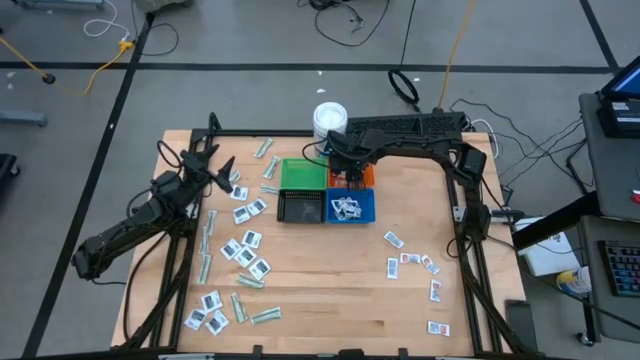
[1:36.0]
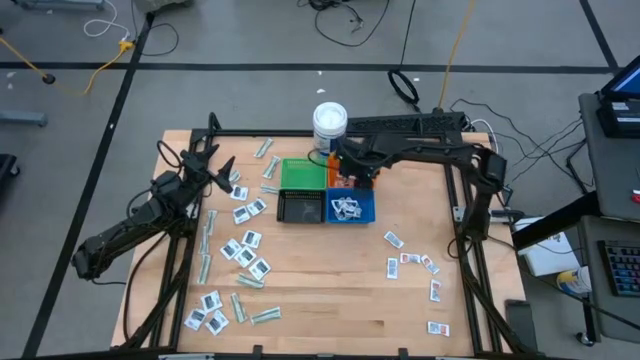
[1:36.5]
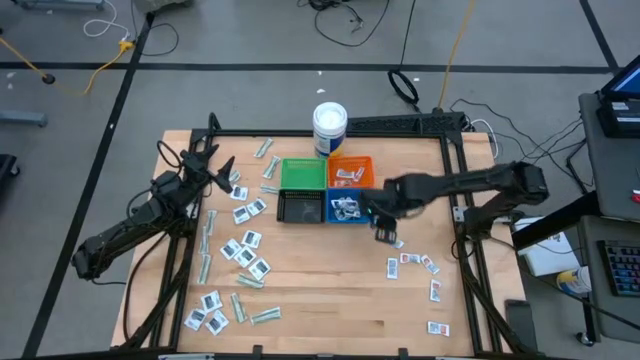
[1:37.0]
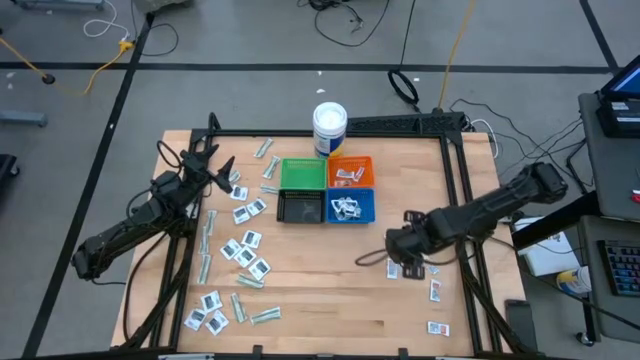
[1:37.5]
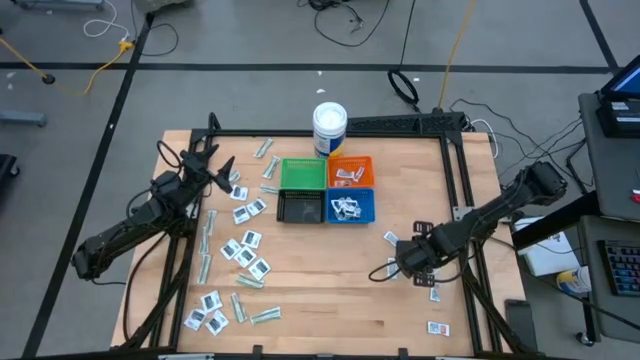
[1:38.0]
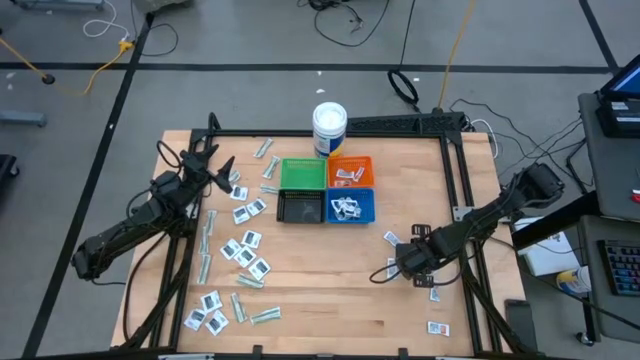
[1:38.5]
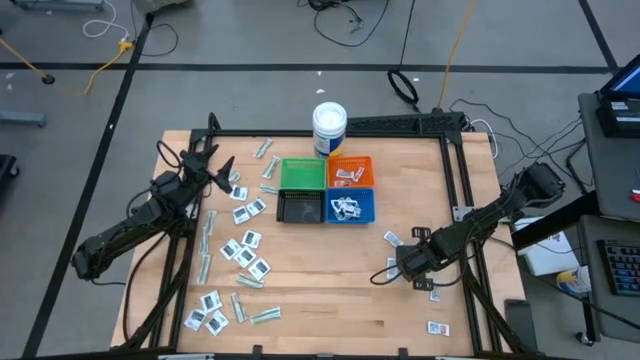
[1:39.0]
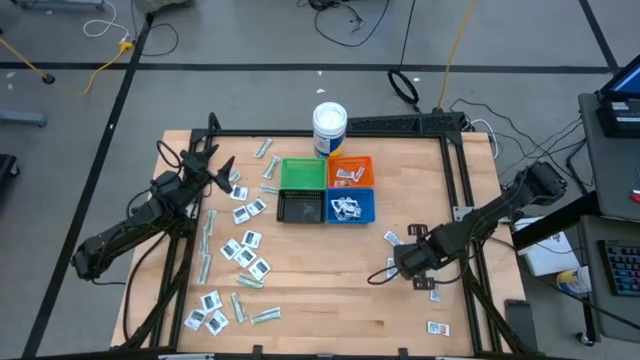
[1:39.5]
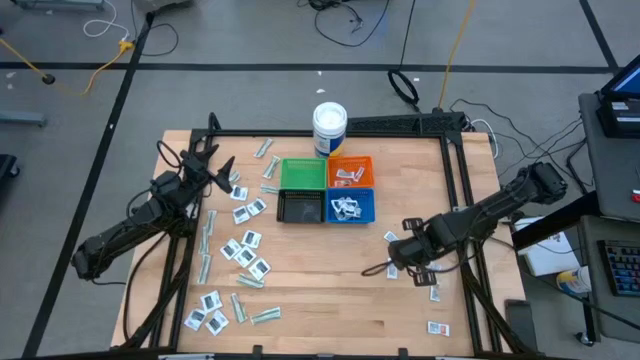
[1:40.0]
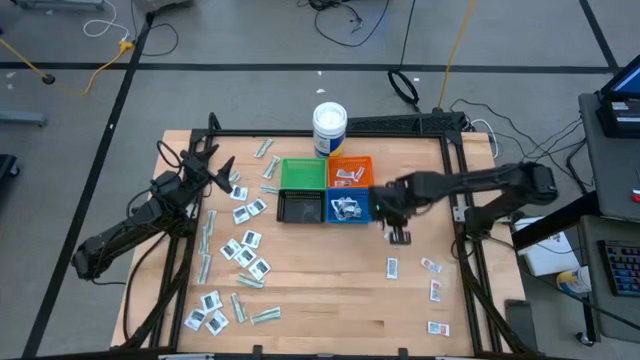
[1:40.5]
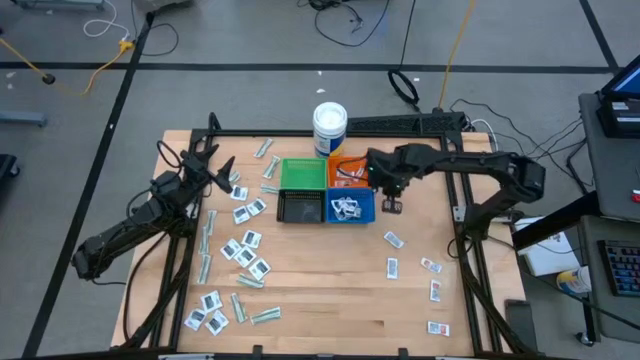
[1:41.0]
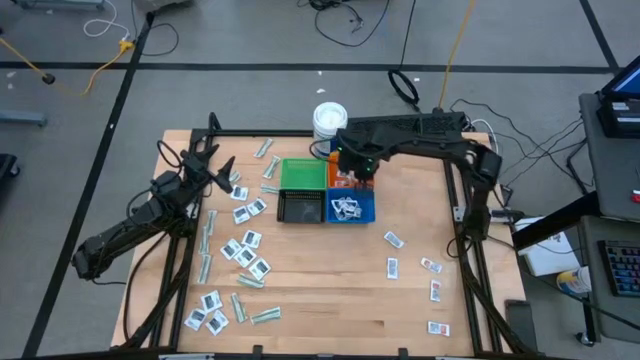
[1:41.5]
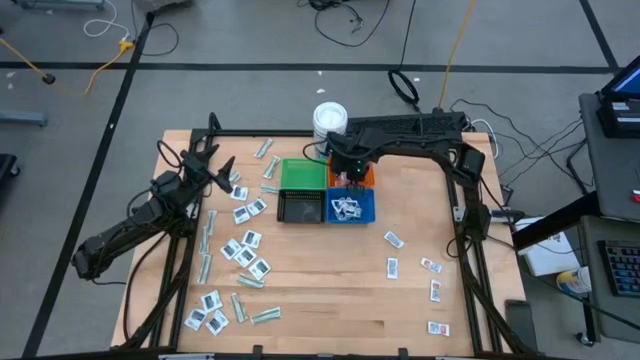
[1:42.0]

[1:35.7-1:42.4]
Task: Pick & Place First Aid Supplies
Put the orange ointment pack into the orange basket

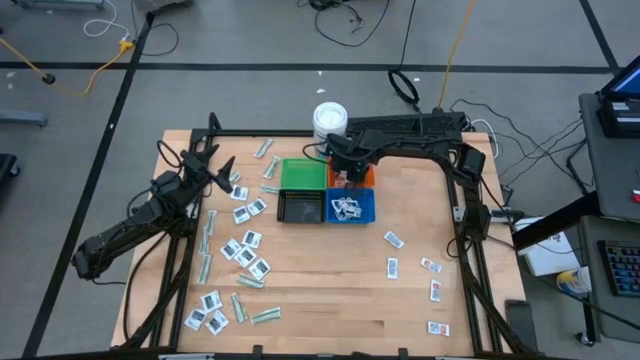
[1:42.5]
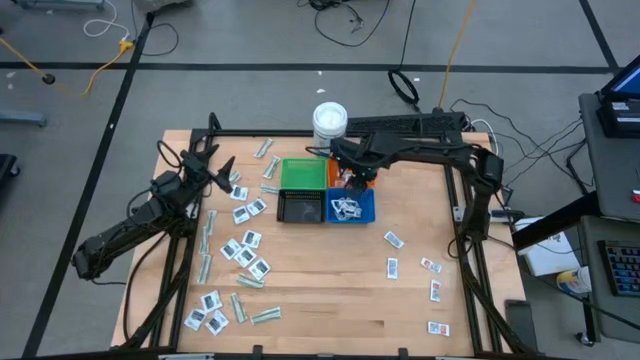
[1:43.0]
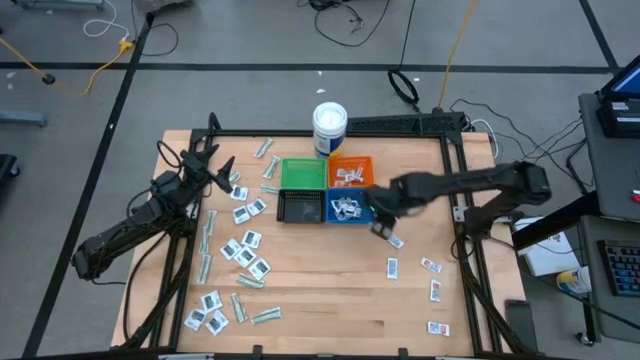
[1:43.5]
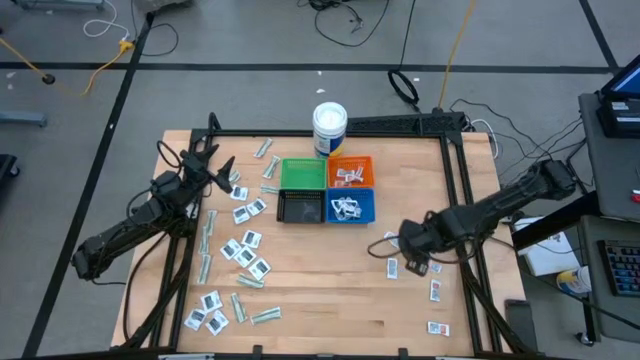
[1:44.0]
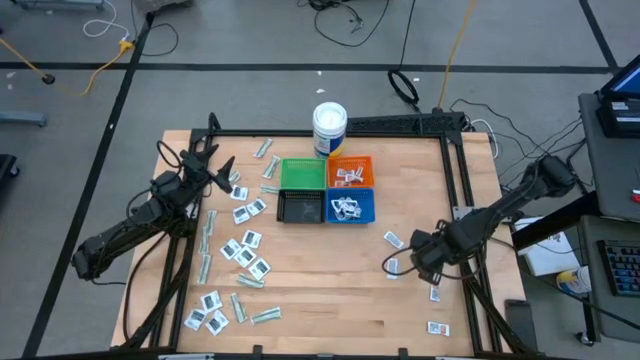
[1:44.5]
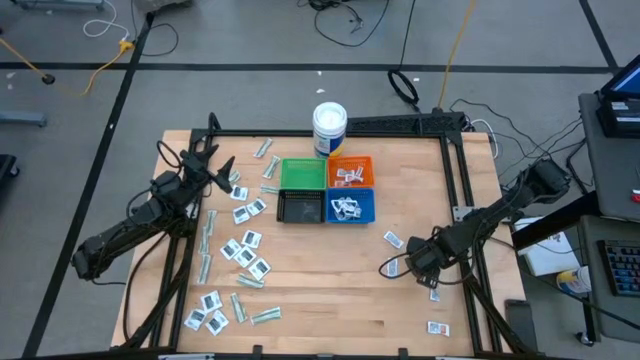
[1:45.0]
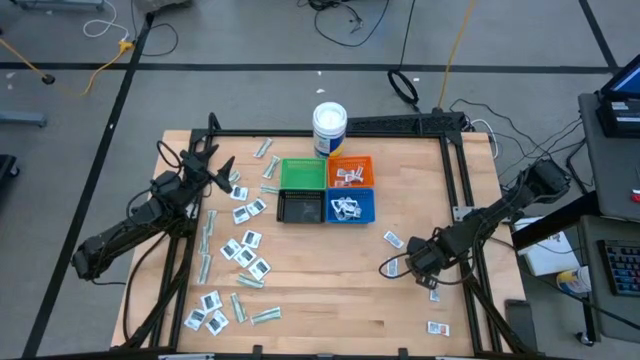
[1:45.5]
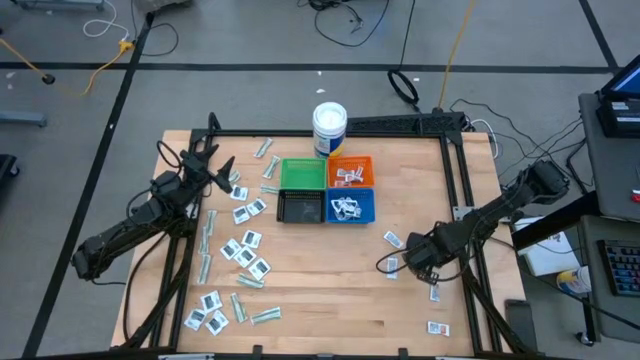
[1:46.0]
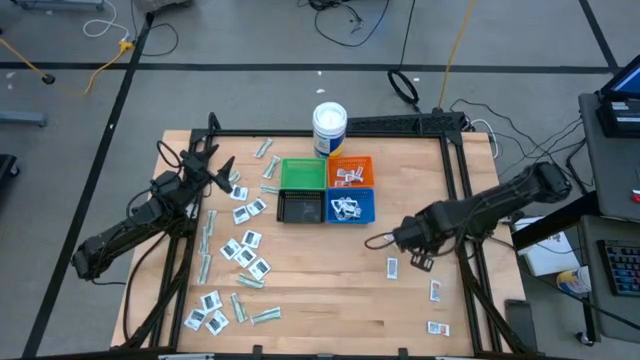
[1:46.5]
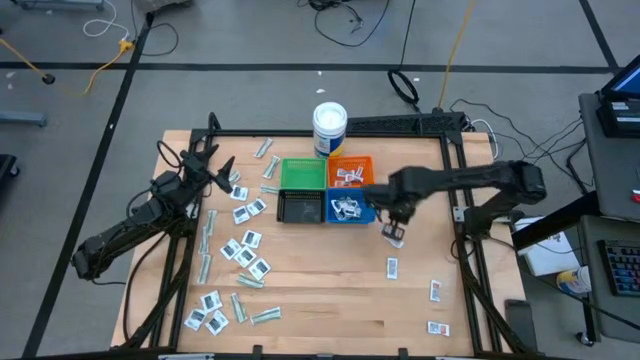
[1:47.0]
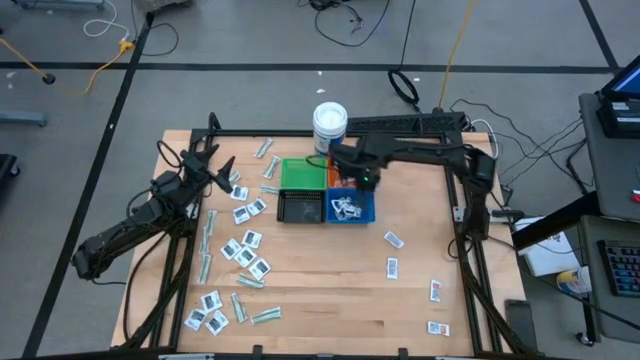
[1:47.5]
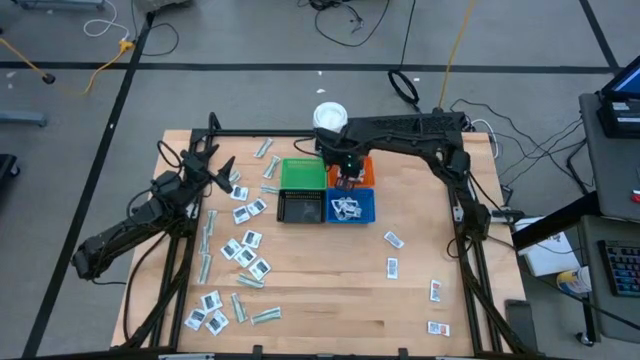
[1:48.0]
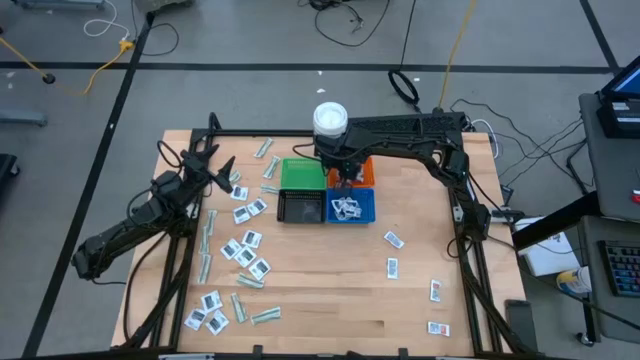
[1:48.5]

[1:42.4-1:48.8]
Put the orange ointment pack into the orange basket

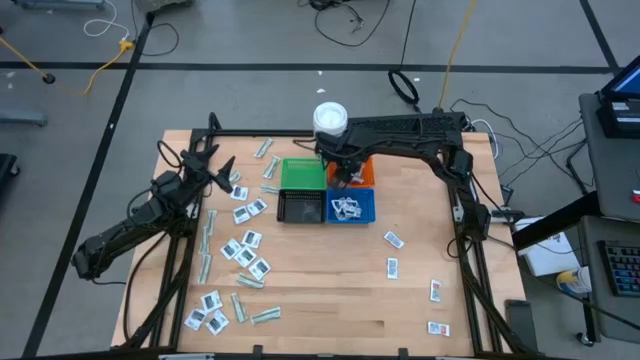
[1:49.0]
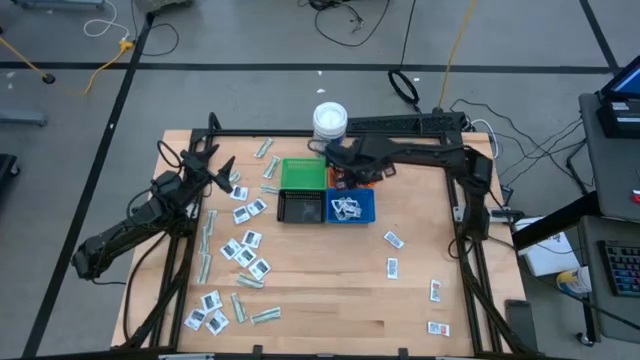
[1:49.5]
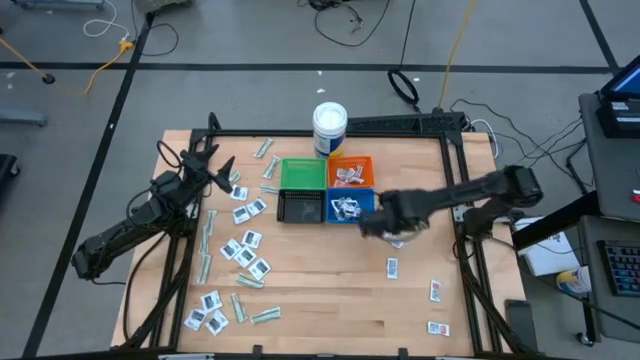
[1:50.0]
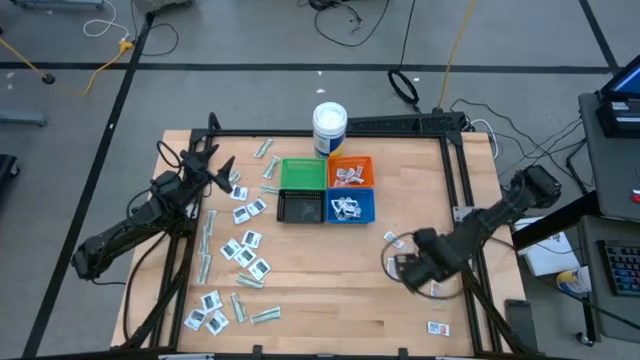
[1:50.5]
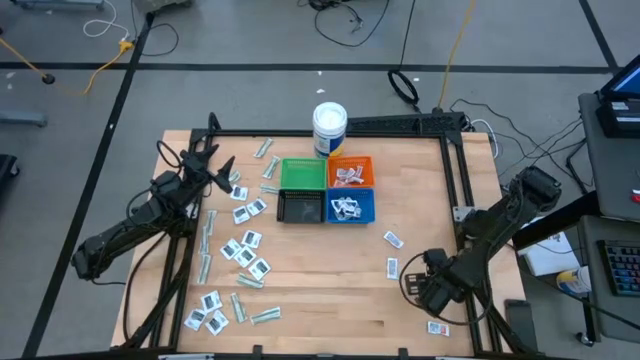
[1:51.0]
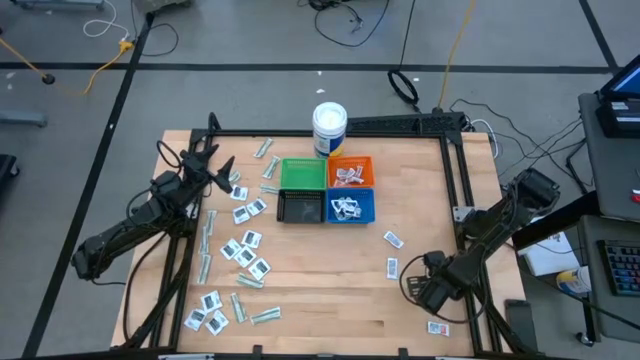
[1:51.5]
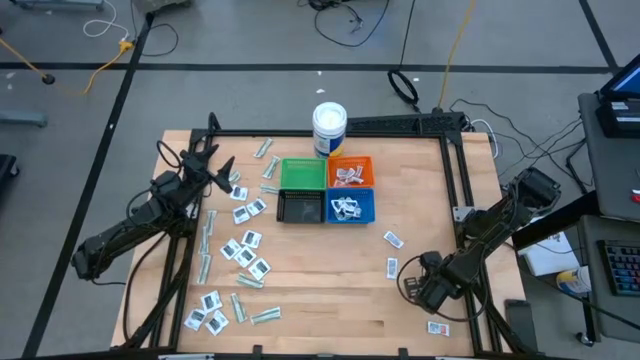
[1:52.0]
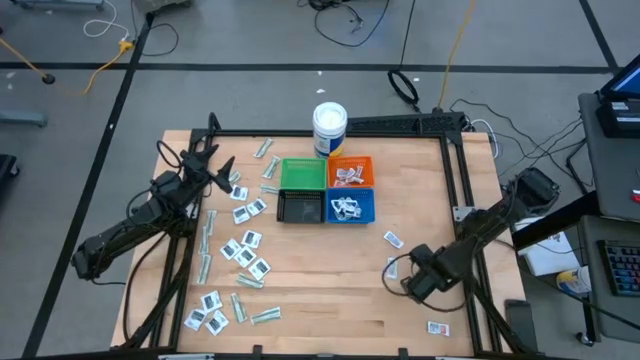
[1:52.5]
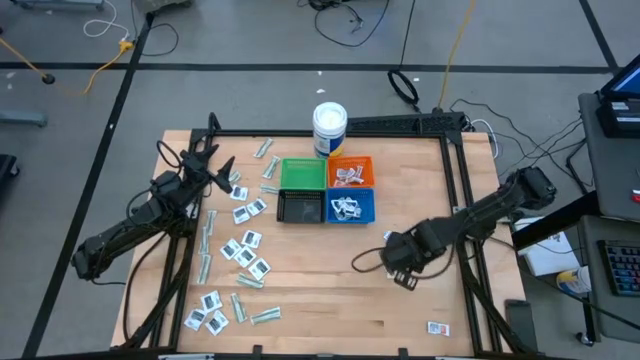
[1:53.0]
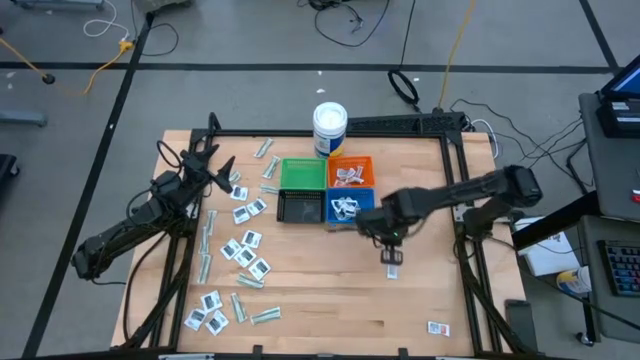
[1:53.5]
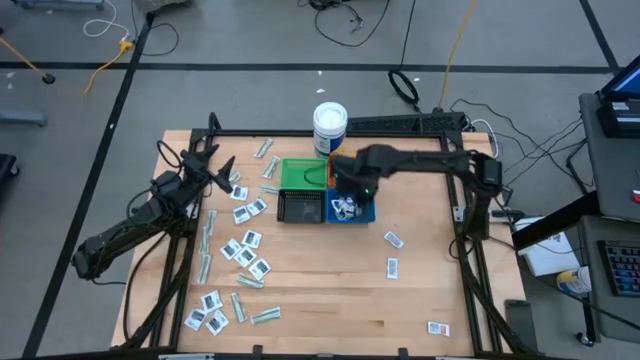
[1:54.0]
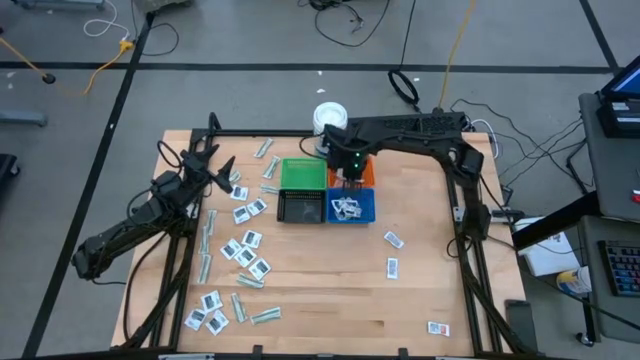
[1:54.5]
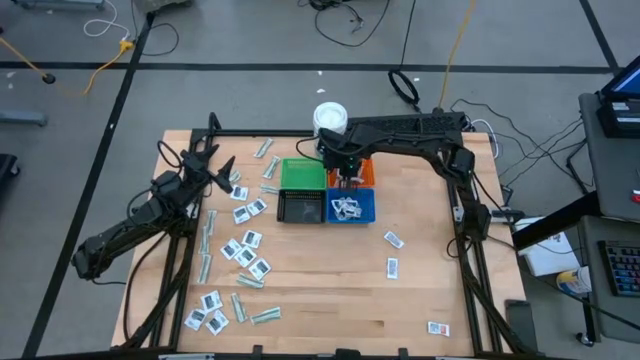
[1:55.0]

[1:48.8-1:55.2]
Put the orange ointment pack into the orange basket

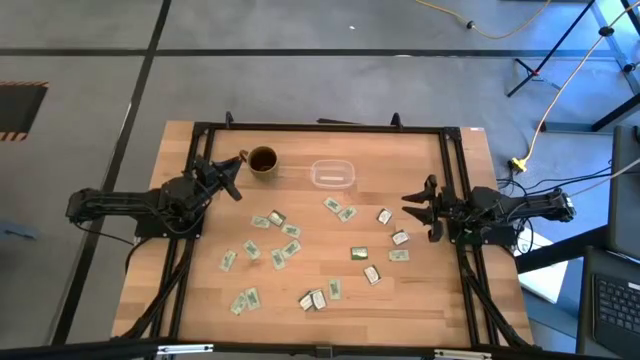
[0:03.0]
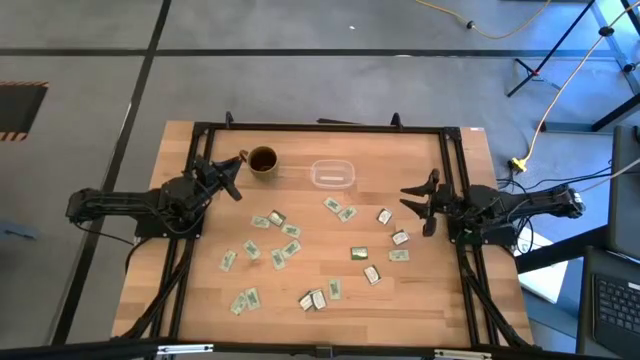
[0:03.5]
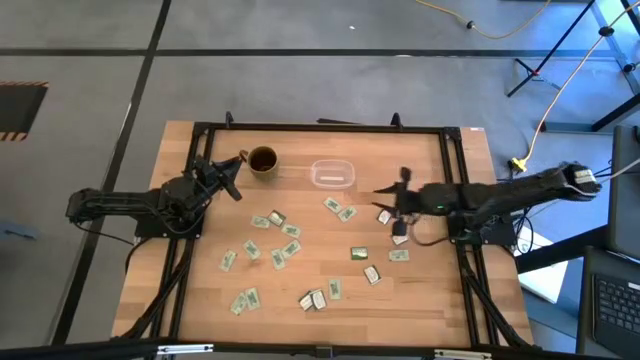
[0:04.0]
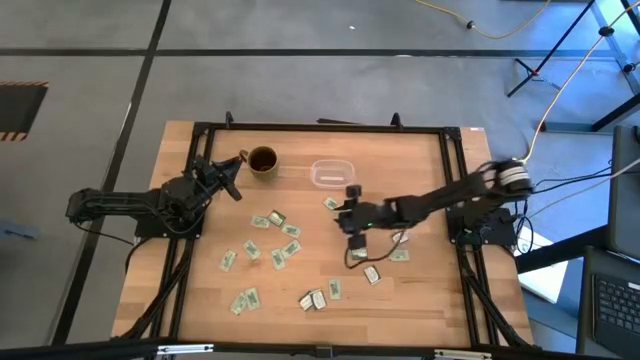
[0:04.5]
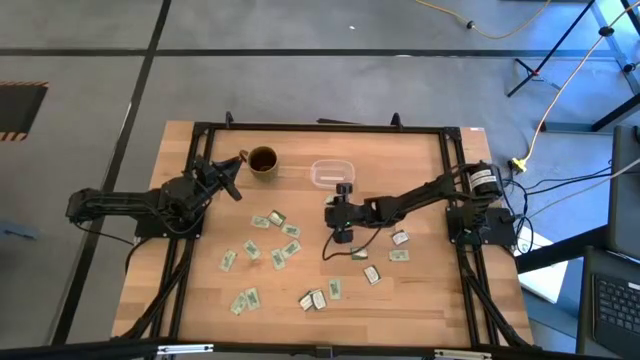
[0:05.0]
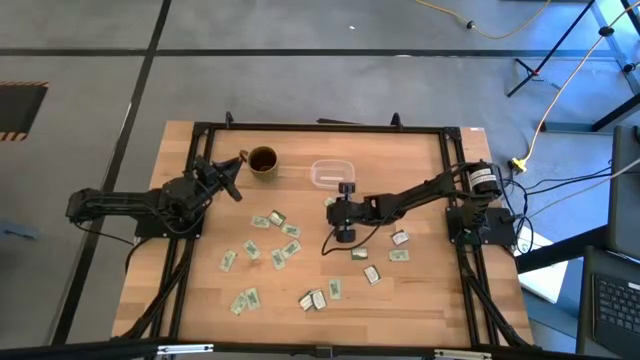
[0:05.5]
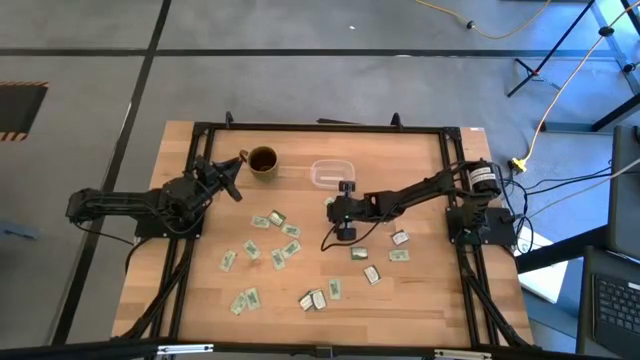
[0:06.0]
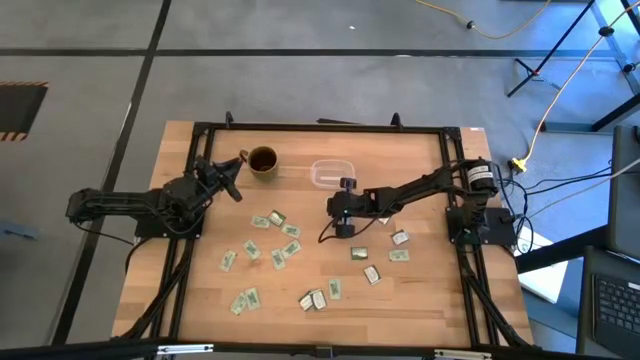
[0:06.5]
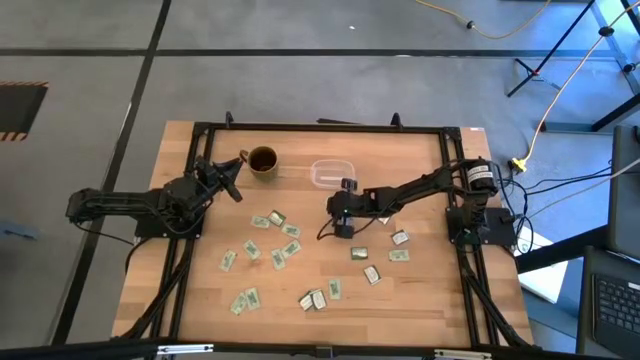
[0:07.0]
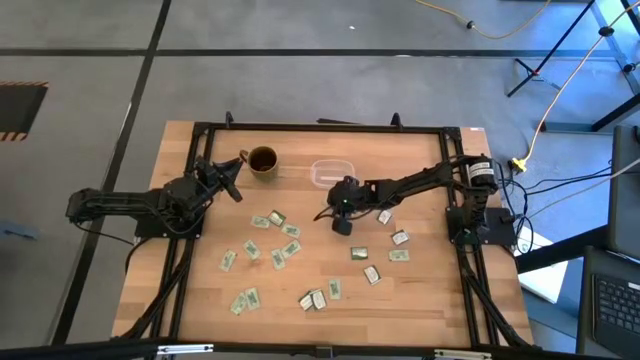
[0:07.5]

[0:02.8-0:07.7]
Task: Pick and place Stevia / Truvia into bins
Put the stevia packet into the transparent container
